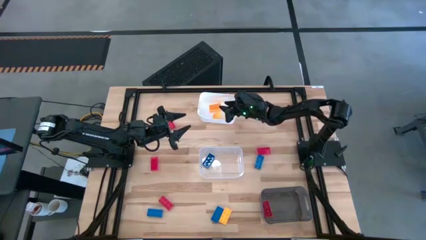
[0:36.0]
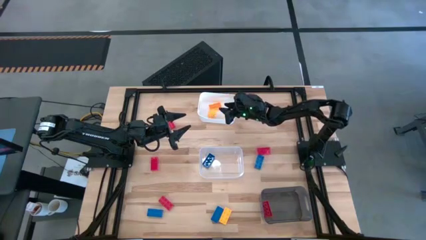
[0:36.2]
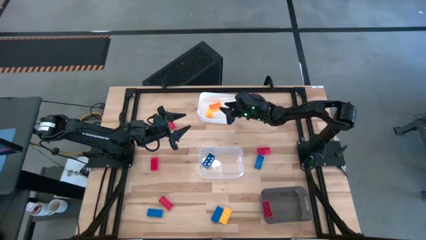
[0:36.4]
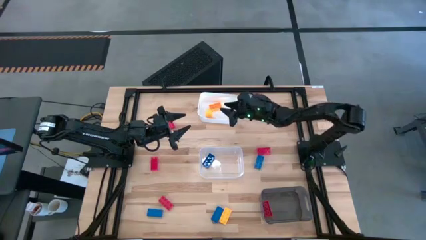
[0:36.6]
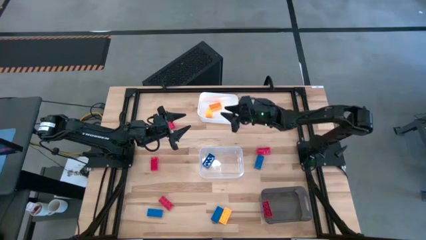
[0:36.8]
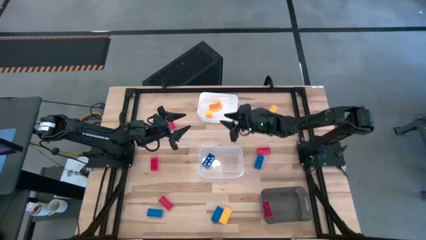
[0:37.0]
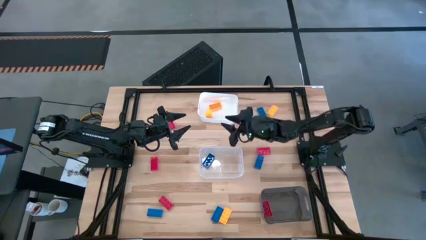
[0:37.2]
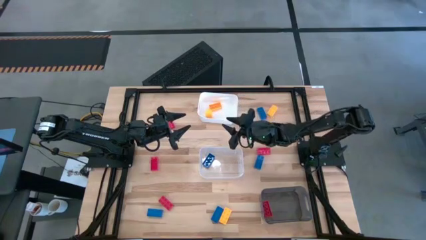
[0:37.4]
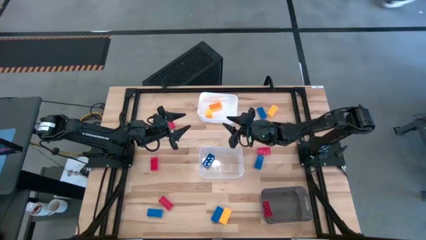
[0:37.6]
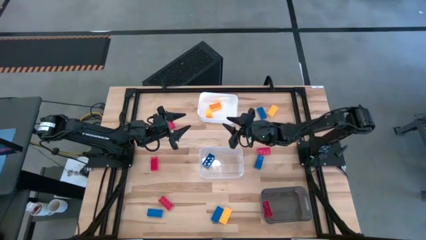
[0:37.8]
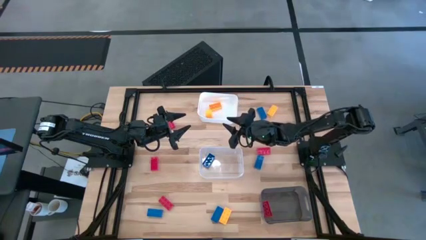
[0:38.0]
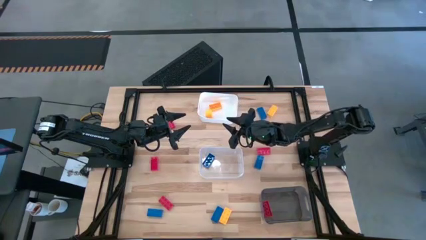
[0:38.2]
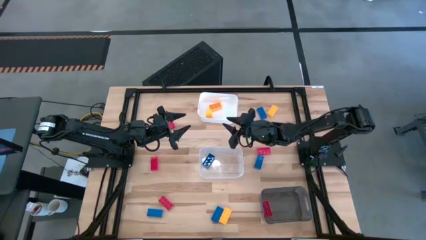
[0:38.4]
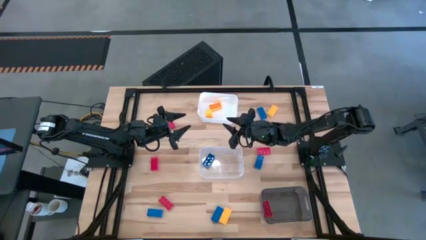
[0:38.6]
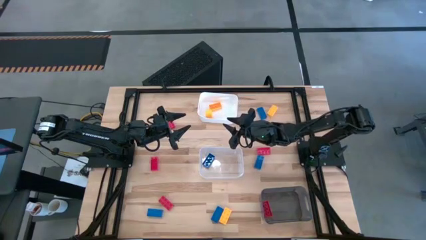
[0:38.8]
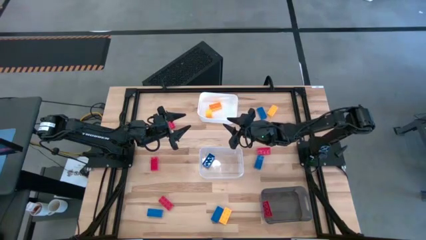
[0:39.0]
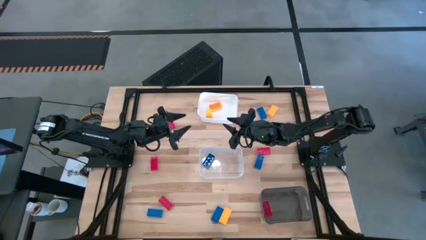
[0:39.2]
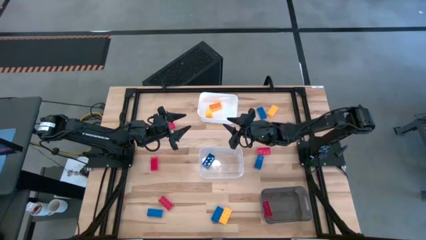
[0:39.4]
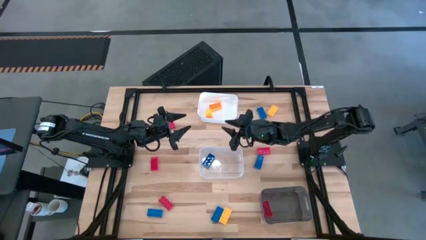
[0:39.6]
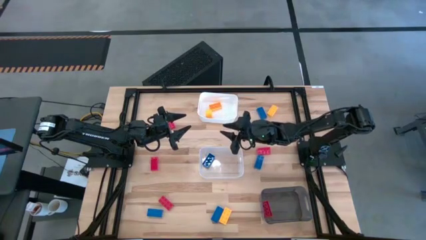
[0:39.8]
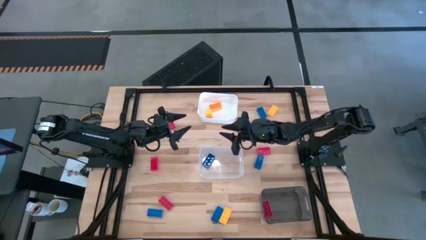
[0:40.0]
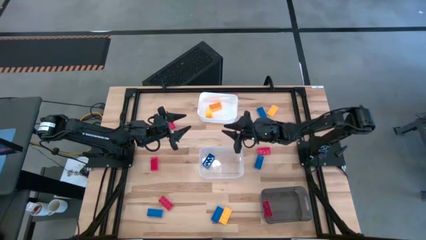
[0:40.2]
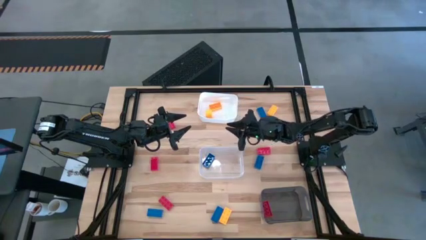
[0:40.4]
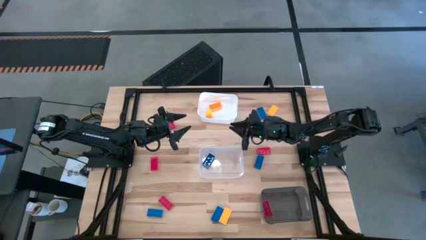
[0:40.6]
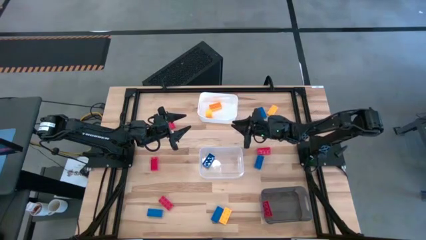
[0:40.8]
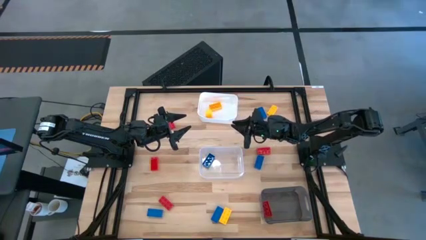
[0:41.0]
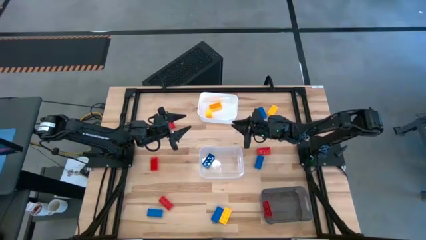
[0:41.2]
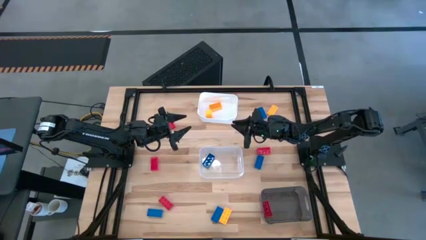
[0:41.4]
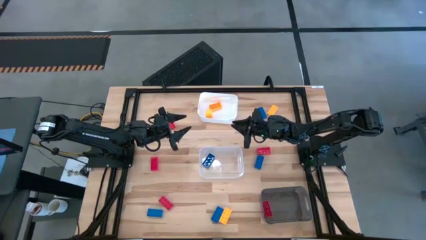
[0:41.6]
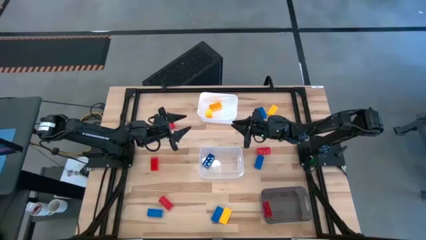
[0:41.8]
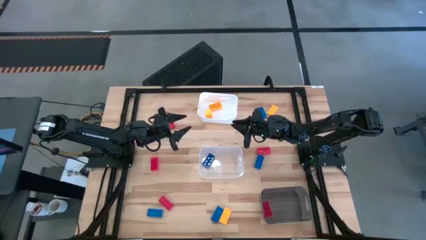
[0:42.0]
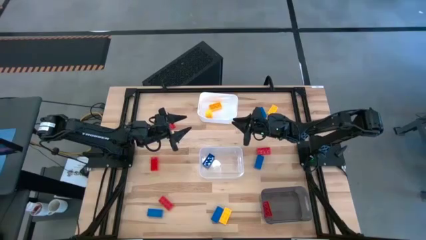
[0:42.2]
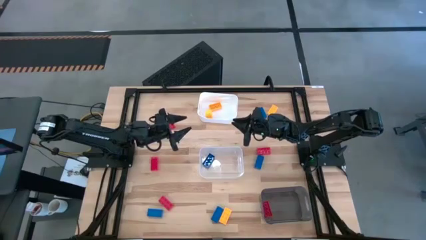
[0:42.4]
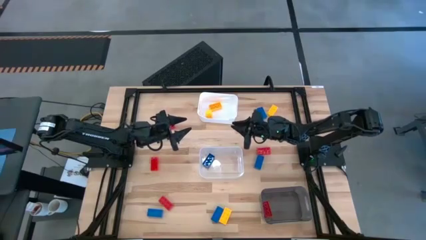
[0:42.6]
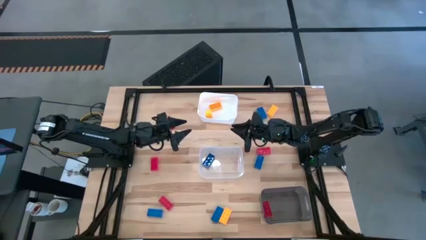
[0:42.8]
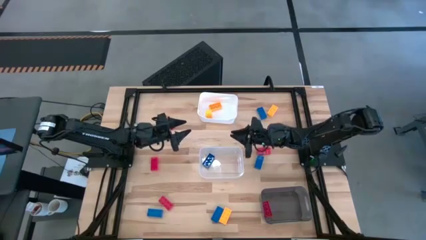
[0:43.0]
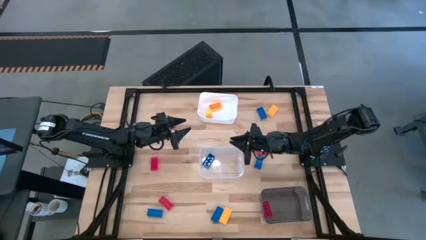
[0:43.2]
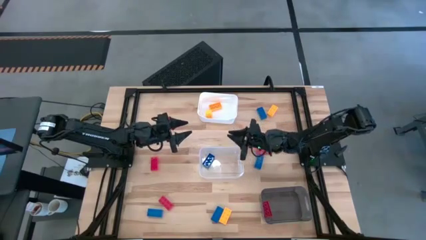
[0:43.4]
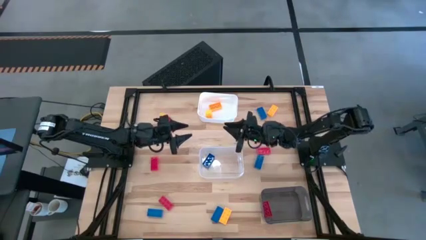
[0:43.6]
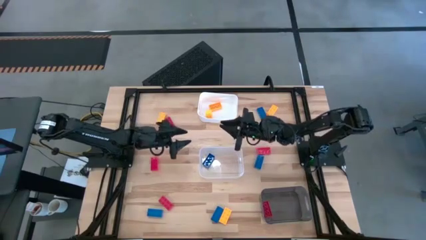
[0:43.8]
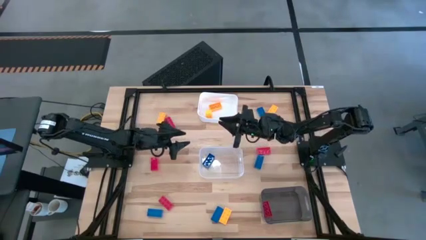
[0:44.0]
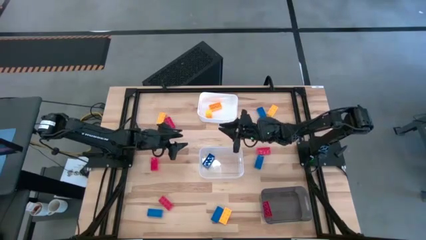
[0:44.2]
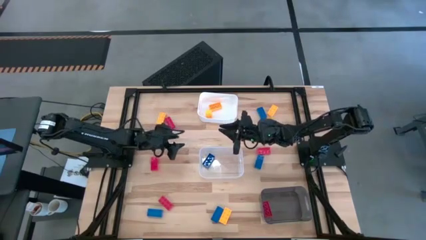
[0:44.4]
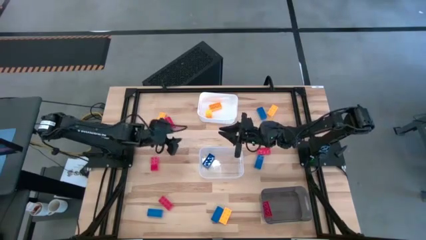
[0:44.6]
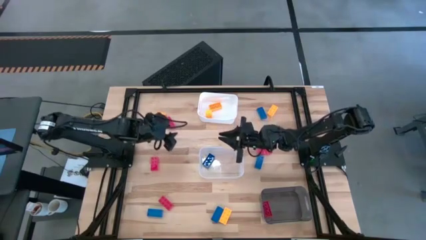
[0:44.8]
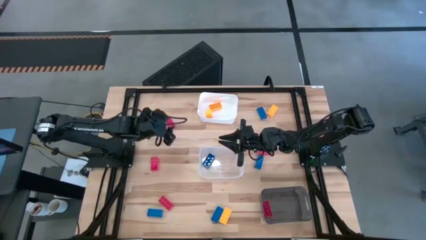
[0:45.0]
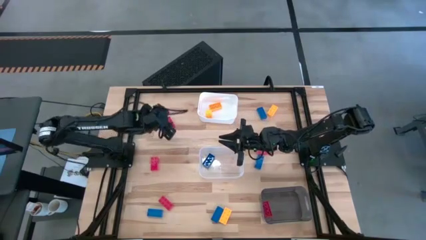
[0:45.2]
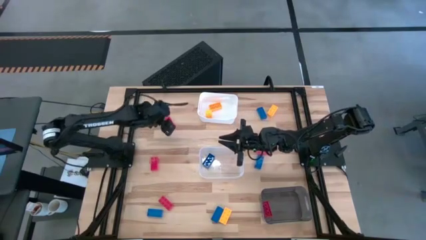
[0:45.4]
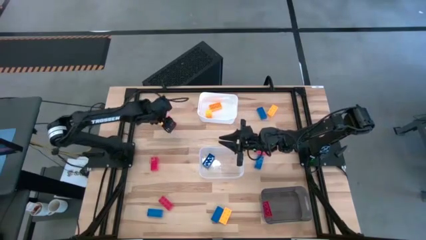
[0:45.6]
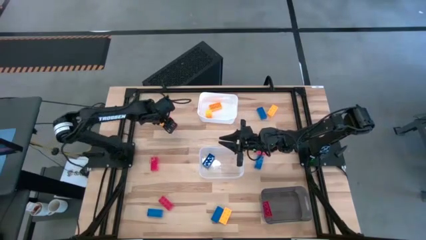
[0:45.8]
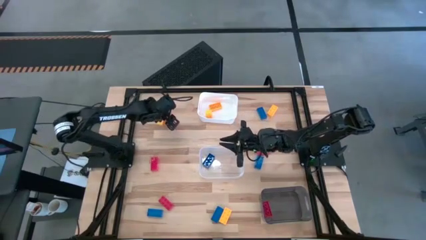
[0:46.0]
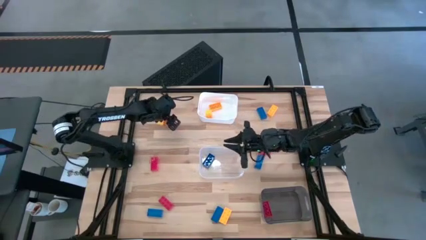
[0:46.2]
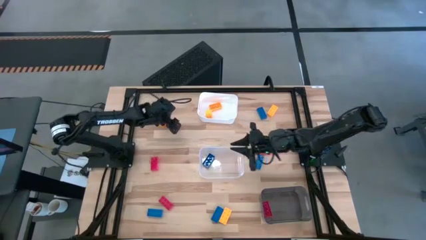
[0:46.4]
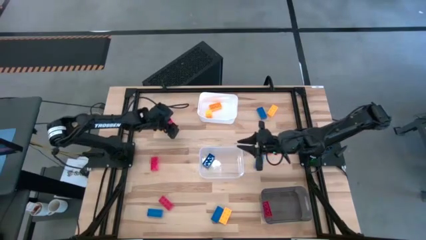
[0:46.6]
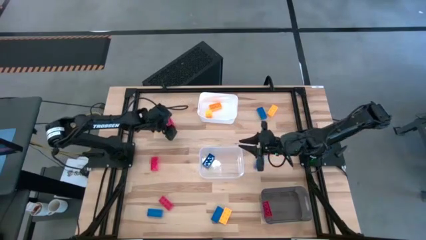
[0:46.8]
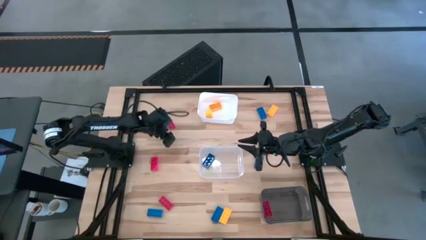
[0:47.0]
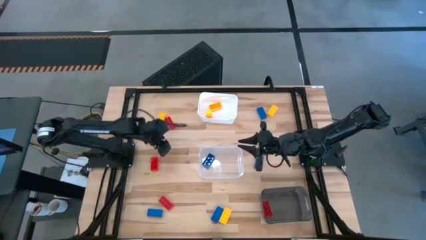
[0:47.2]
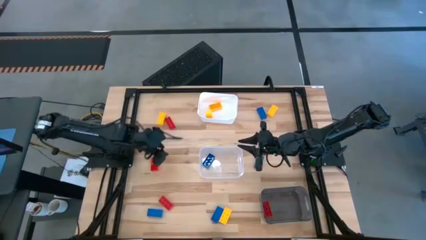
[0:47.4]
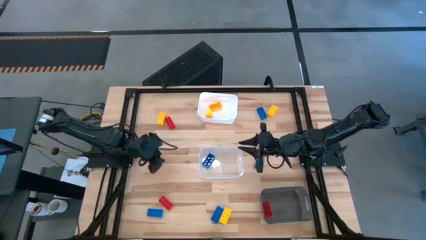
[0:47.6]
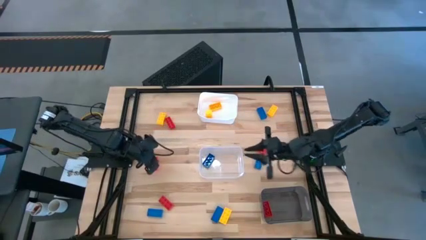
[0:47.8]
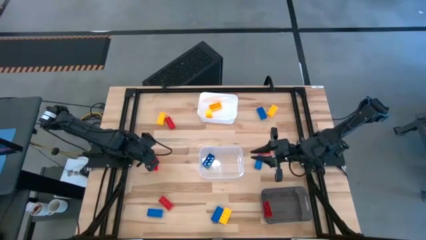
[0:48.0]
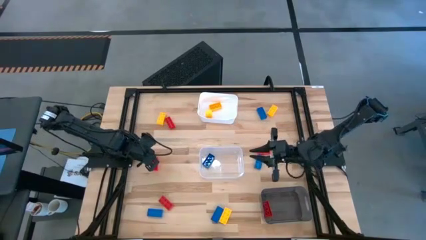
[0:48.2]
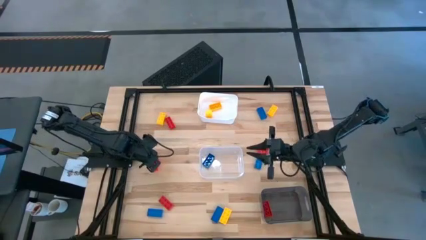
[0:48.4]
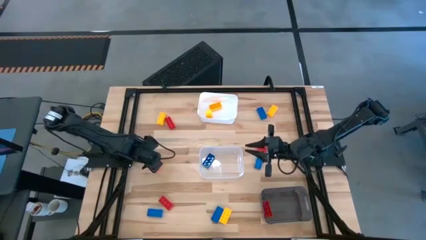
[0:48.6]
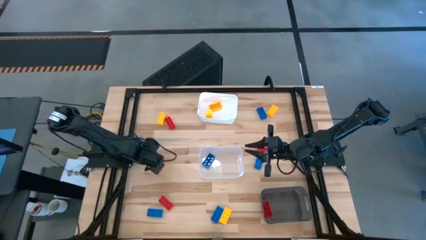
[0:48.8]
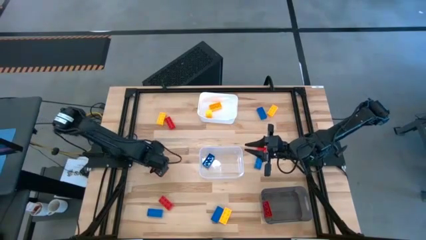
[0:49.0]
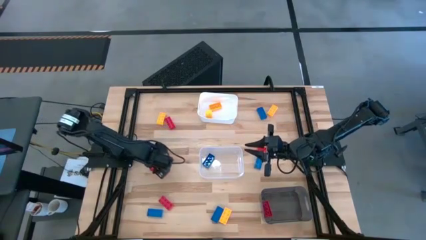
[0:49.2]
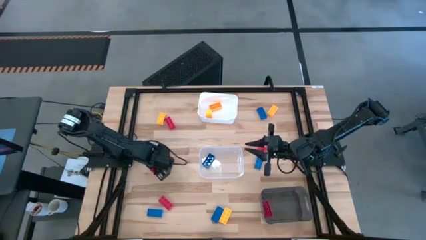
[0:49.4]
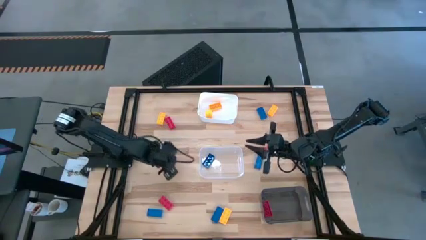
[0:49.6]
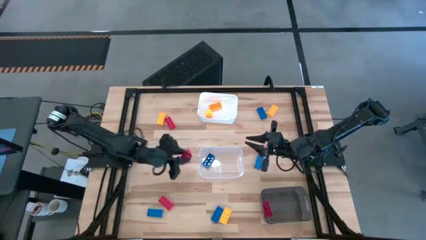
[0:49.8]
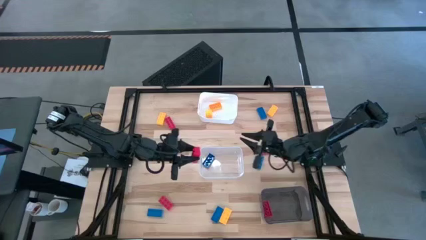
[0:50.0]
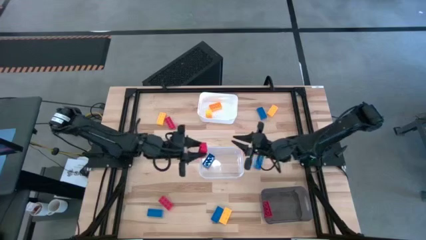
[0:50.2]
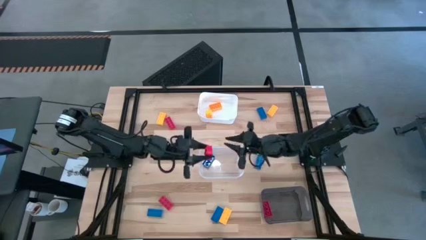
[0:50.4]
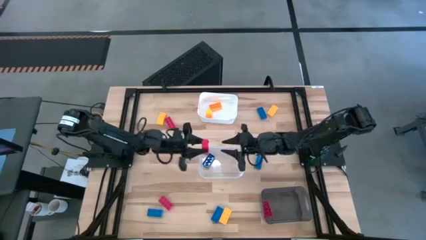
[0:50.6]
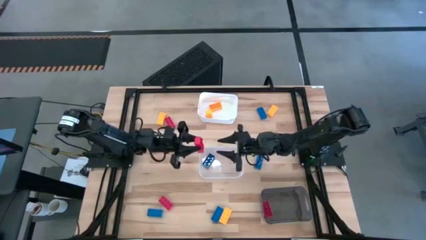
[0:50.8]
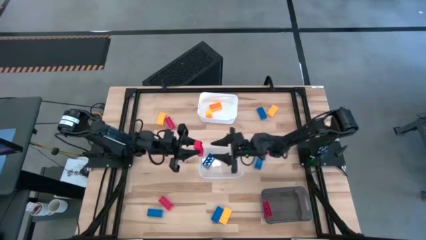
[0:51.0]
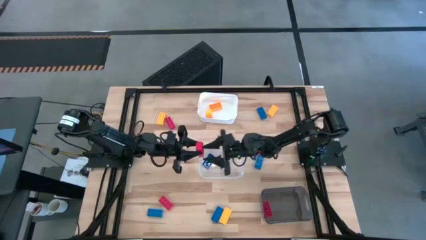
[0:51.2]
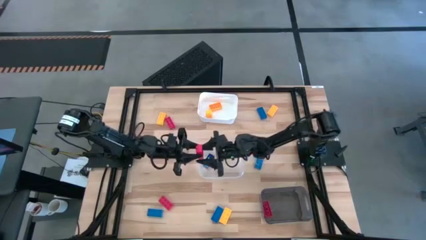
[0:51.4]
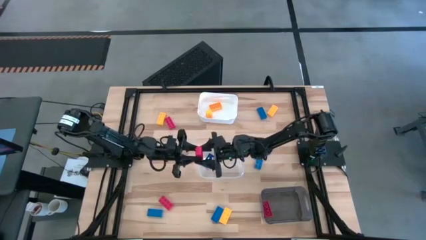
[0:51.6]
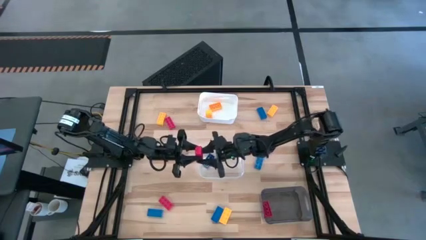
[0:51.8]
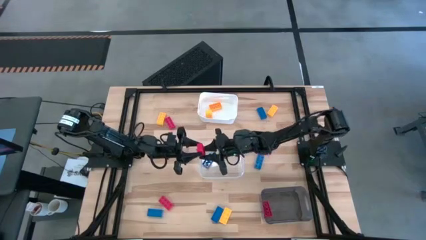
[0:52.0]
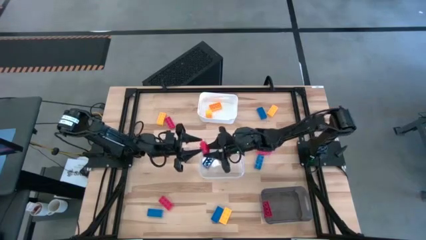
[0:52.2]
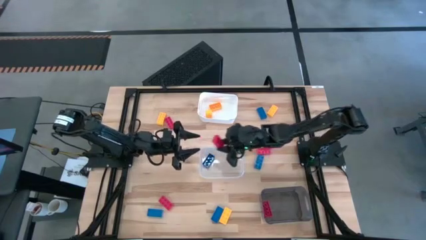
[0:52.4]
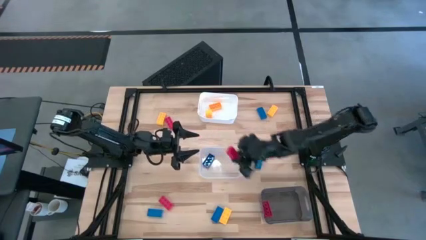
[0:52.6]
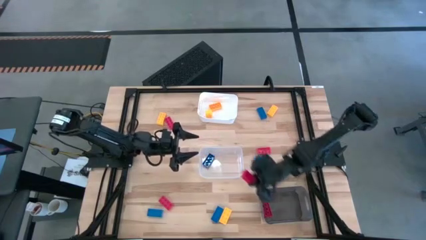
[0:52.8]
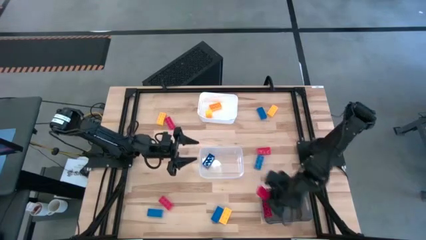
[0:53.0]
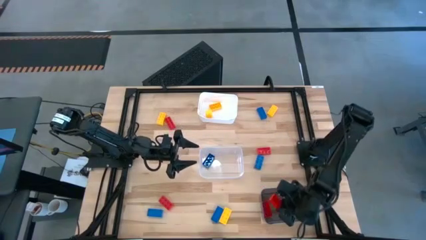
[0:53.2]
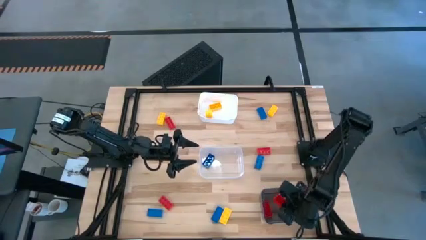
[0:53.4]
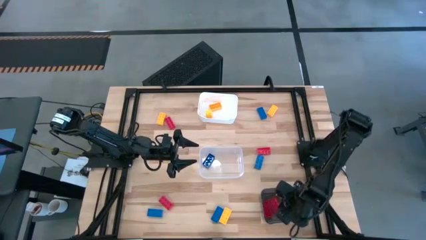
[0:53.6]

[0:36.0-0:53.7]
Task: Sort & place blocks by color
Put the red game piece into the black bin
